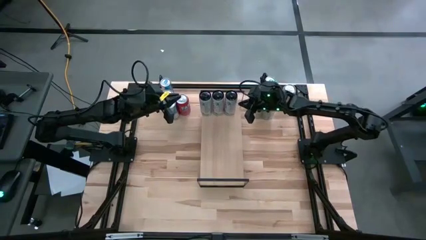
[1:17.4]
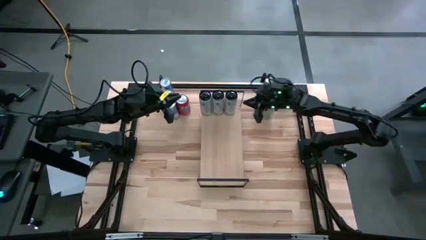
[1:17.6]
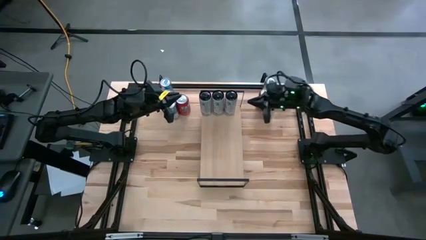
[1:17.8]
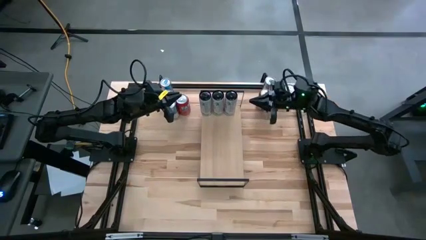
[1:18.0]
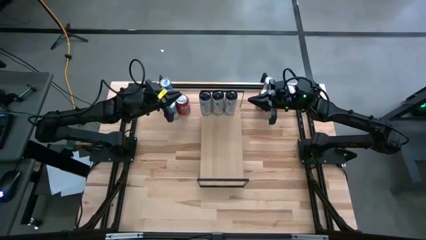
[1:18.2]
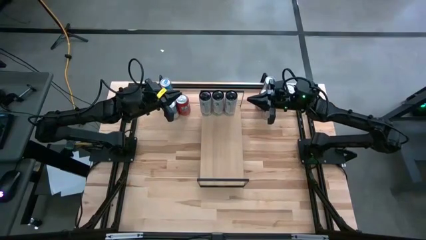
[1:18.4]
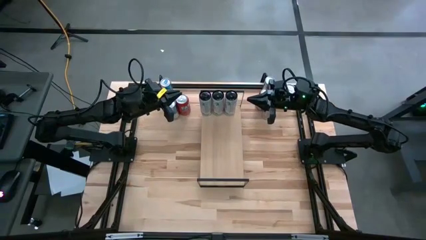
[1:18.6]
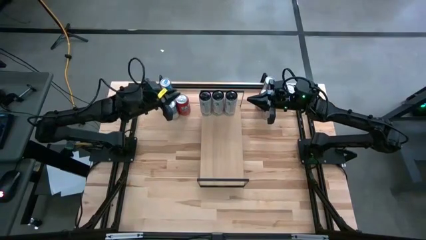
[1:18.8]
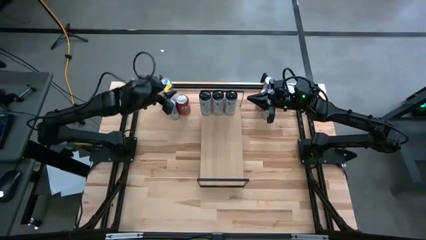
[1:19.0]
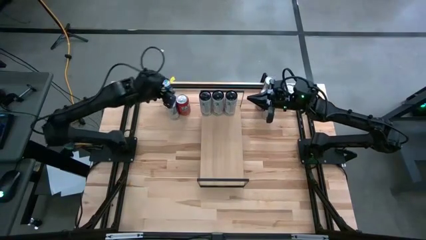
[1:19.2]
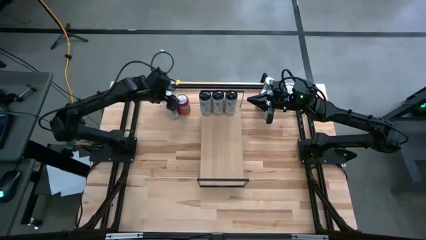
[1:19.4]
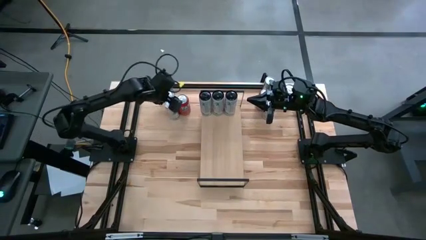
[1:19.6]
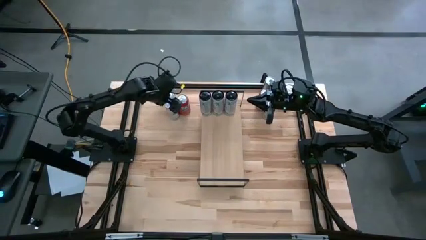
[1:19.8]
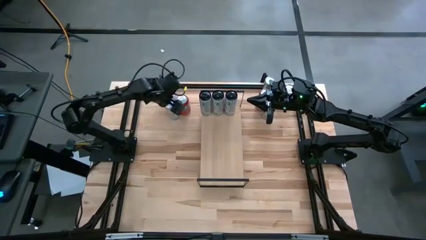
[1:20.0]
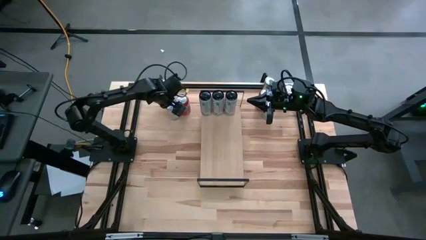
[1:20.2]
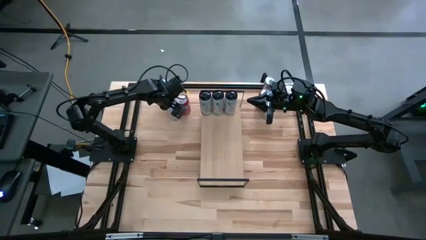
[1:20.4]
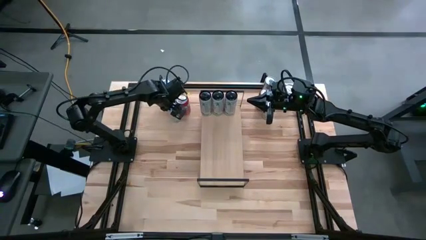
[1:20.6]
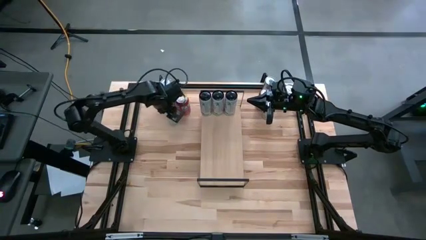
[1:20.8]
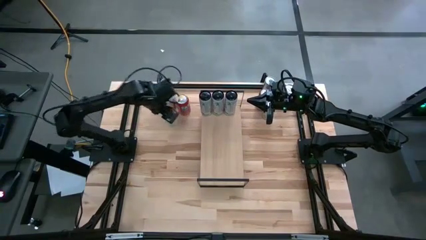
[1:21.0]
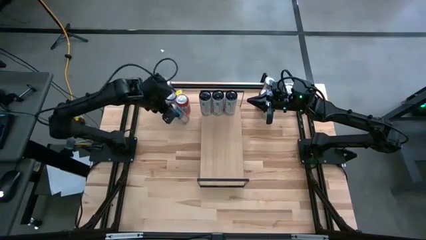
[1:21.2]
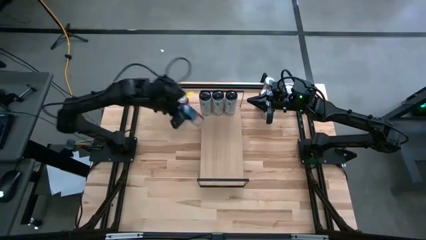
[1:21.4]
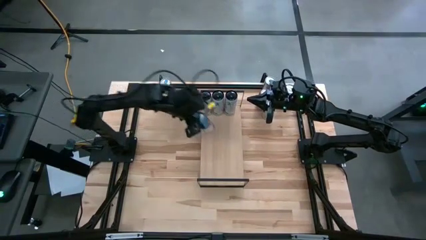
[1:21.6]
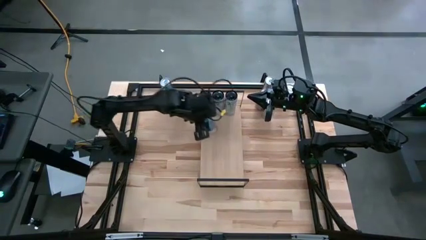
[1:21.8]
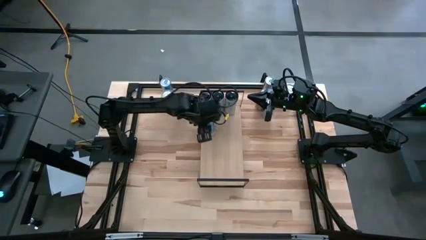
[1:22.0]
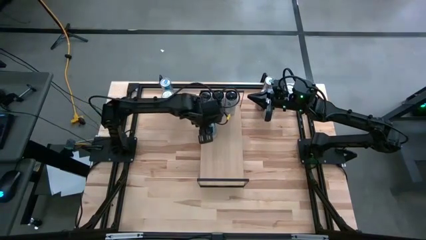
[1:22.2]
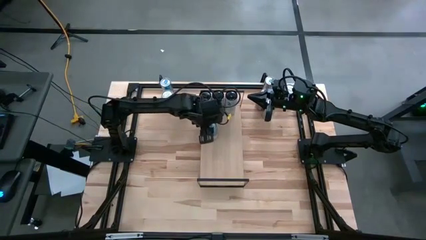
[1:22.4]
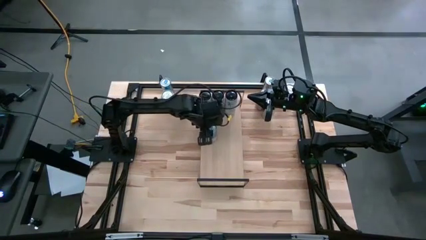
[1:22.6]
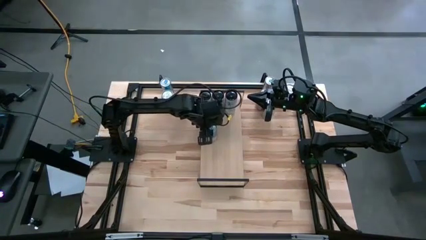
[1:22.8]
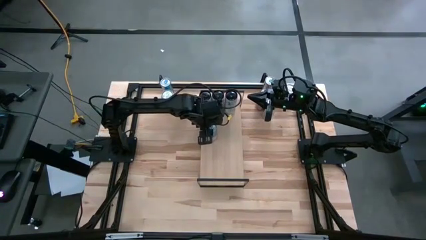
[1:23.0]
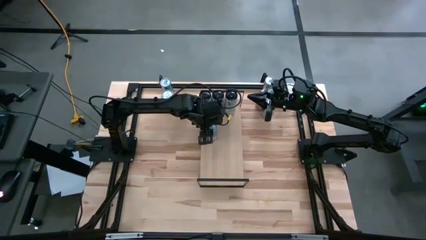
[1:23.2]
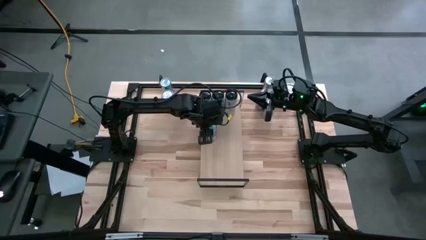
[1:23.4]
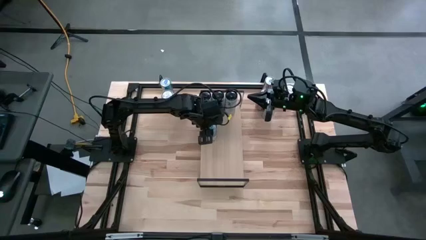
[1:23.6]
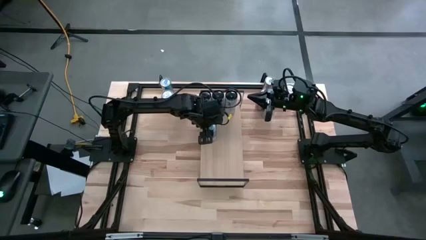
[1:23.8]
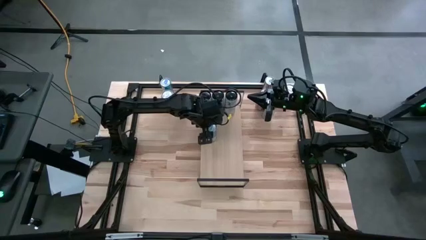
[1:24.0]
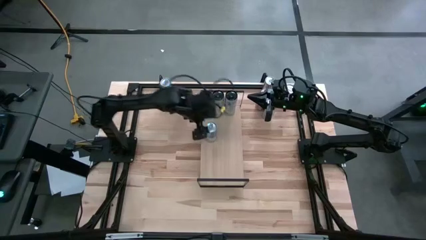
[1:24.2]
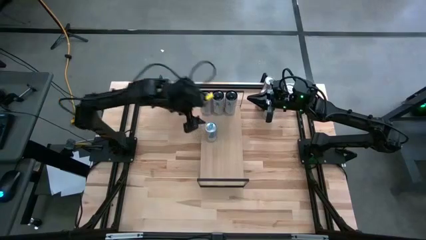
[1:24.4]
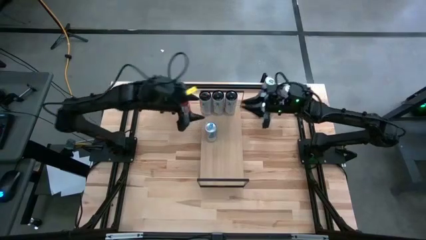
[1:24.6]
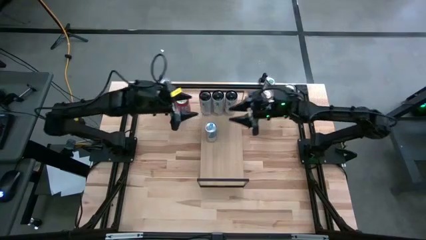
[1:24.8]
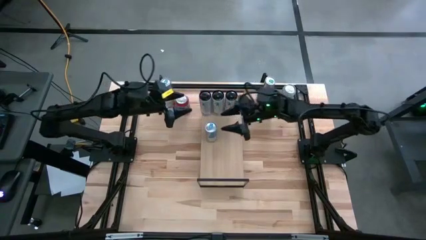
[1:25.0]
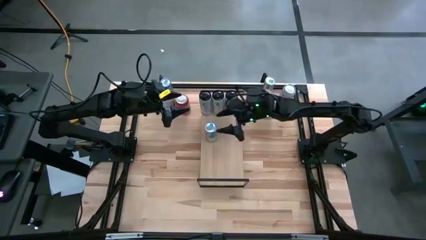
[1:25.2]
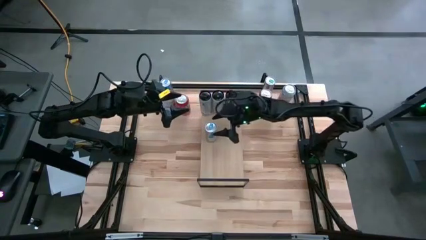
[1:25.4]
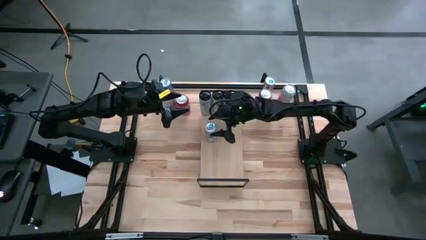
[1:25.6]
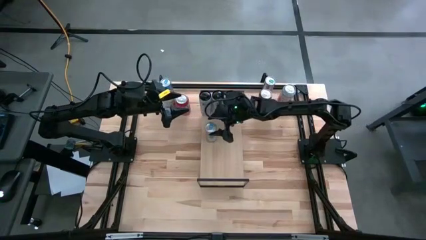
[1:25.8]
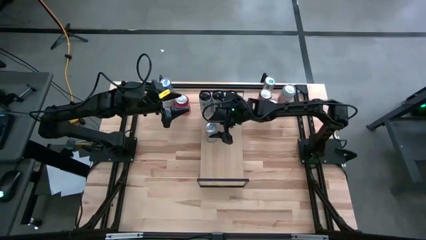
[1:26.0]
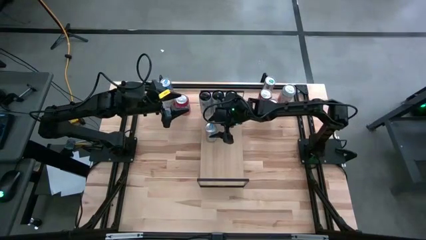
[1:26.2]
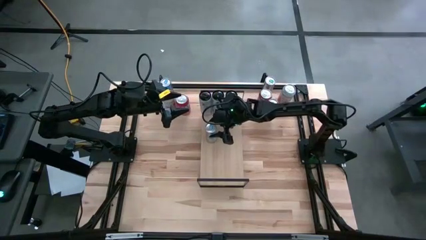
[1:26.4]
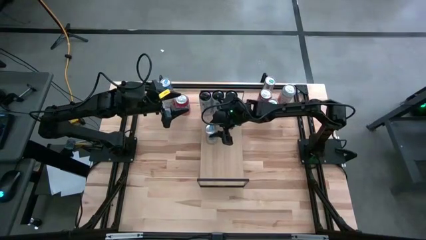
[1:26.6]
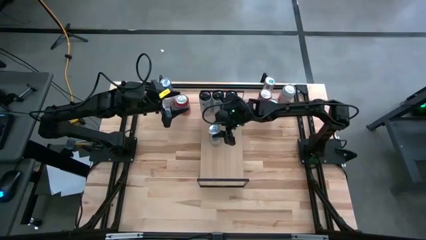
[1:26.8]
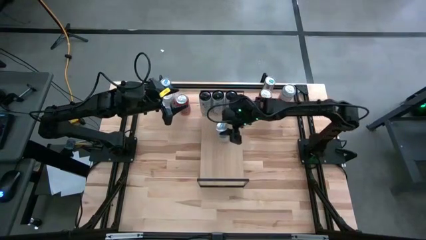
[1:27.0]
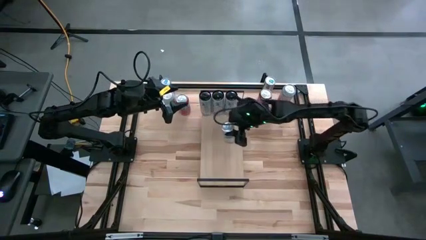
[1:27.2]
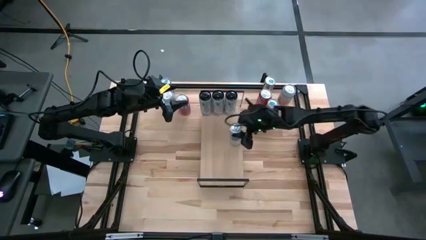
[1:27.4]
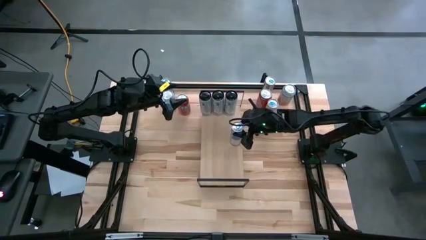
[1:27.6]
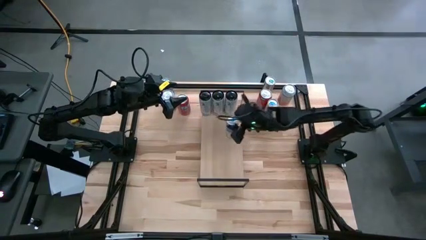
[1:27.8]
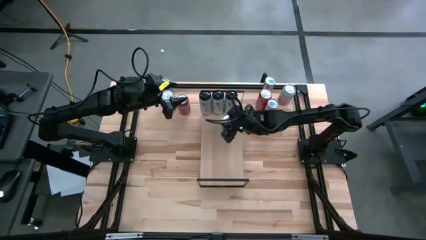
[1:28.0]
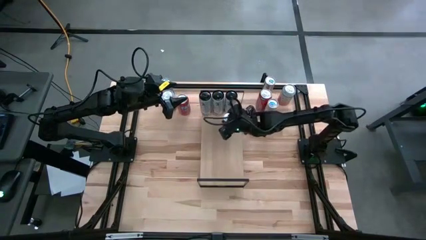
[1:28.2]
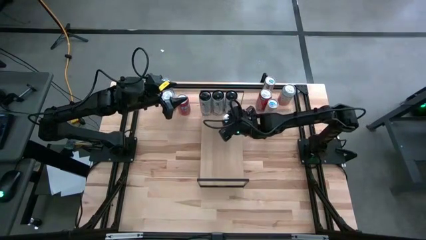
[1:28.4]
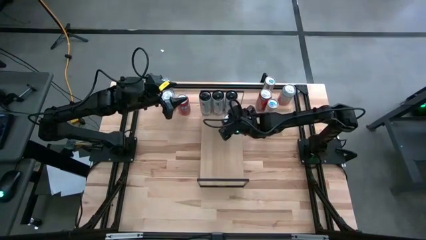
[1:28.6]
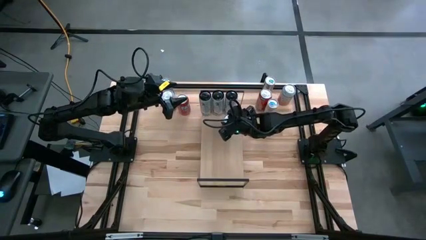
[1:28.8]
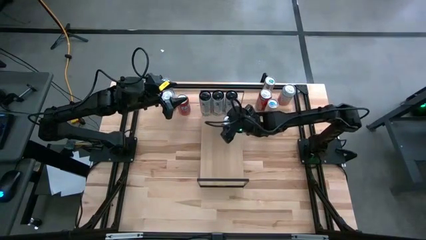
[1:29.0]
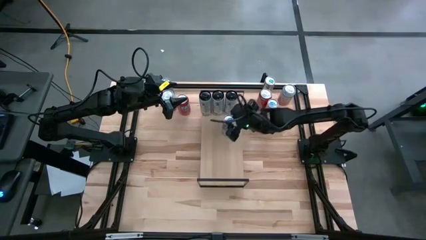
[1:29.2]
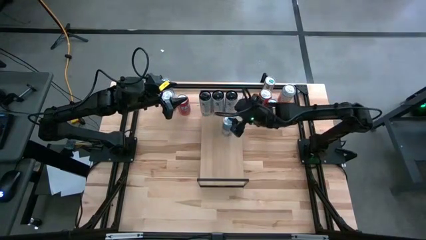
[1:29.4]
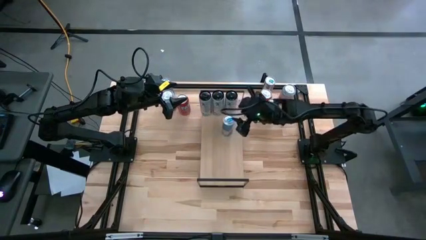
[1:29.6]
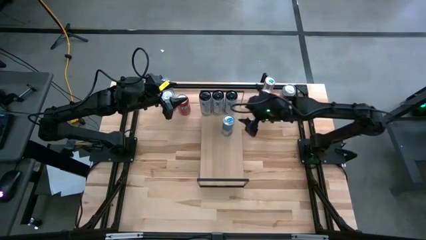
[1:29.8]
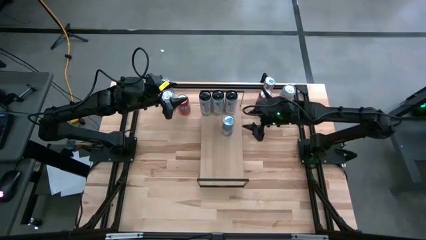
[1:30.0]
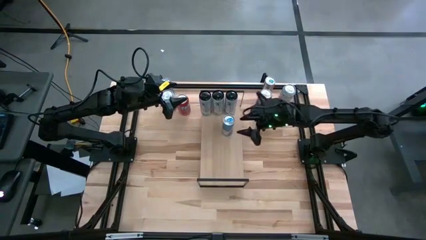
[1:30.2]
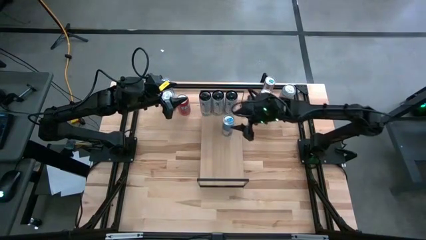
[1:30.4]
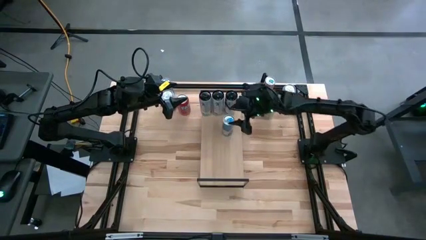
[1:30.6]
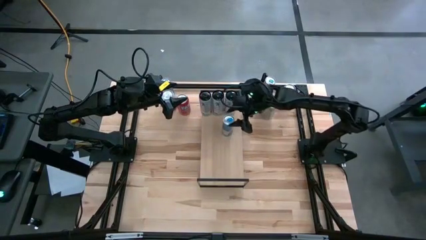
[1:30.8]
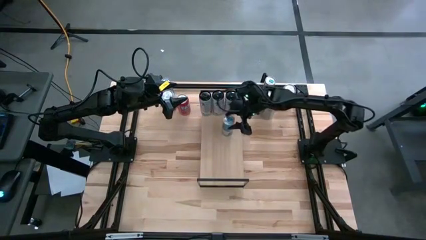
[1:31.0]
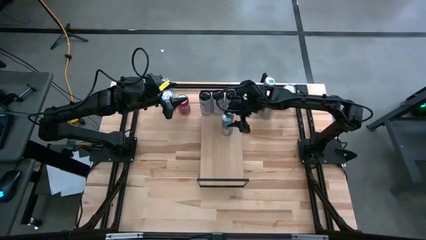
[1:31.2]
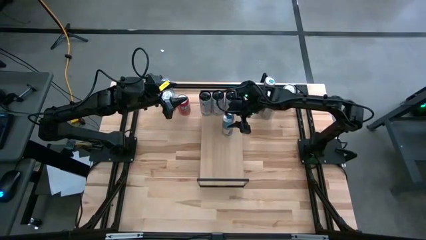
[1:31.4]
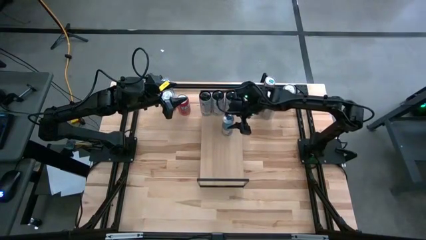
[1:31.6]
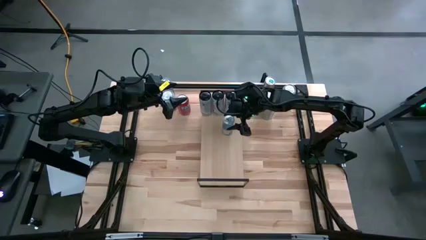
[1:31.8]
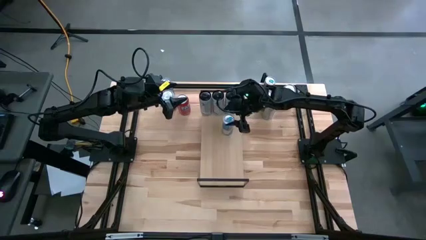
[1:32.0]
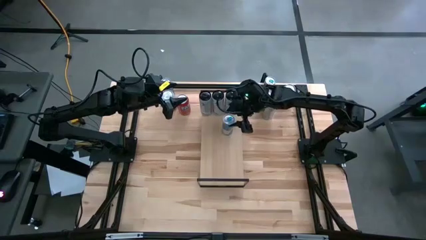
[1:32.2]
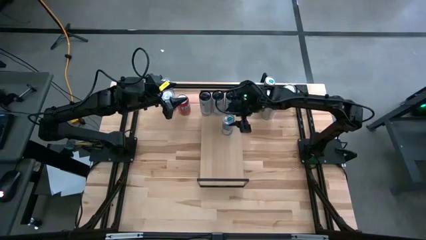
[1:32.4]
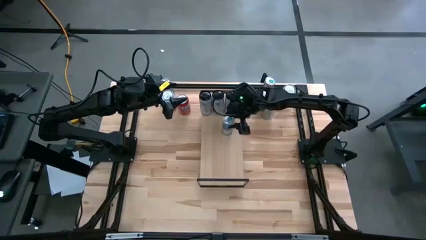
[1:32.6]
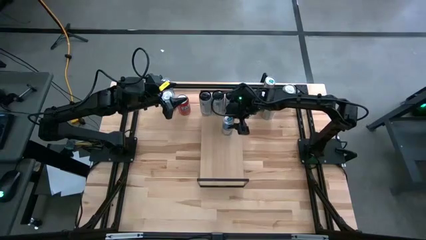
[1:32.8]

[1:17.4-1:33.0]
Task: Place canned beverage on shelf
Put the bottom left blue soda can on the shelf

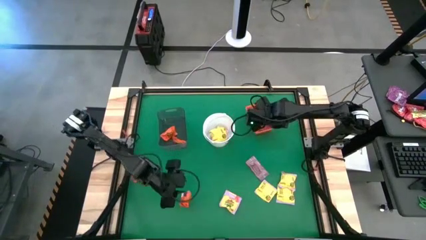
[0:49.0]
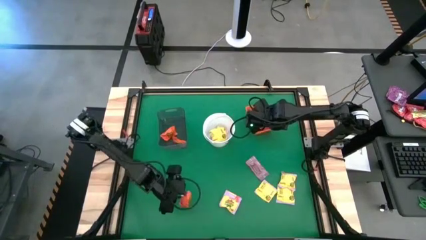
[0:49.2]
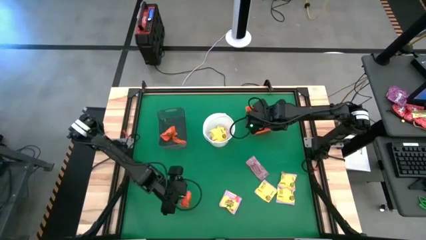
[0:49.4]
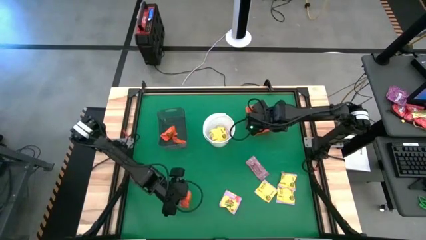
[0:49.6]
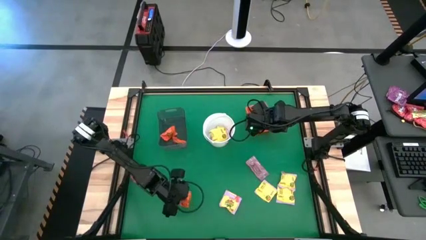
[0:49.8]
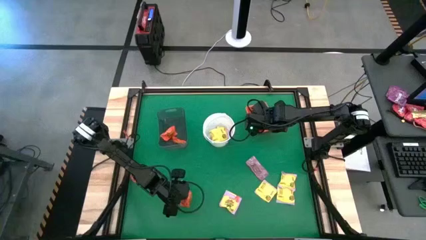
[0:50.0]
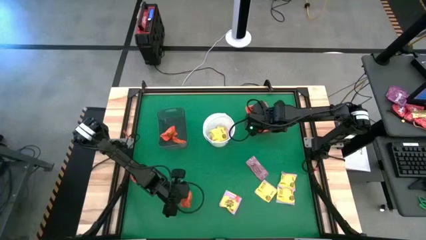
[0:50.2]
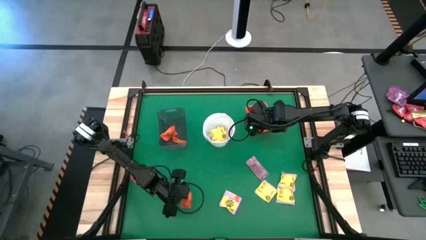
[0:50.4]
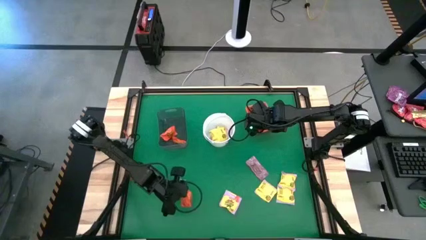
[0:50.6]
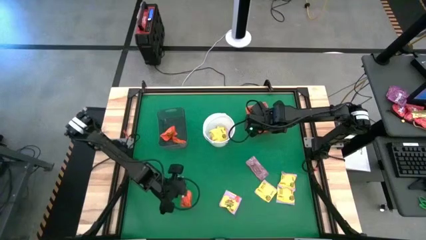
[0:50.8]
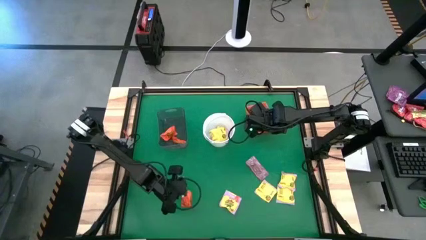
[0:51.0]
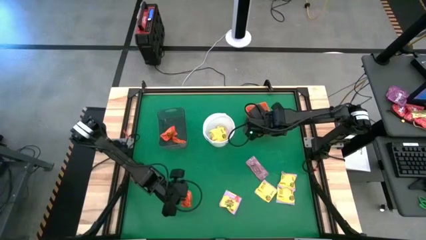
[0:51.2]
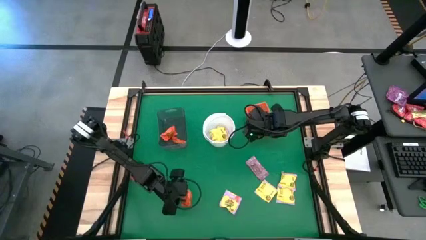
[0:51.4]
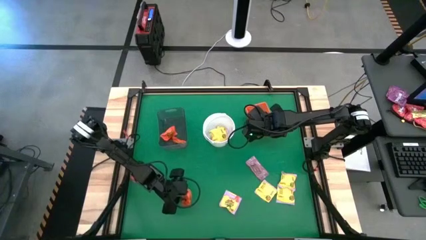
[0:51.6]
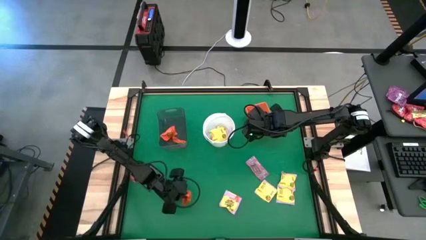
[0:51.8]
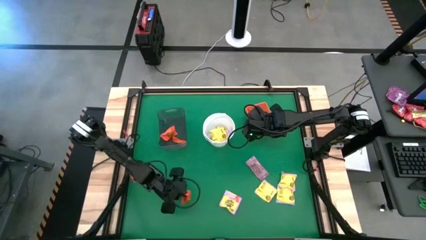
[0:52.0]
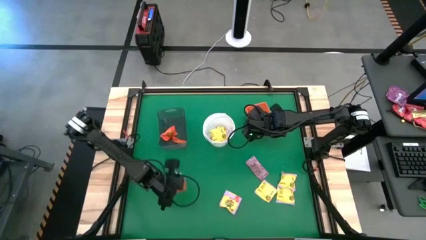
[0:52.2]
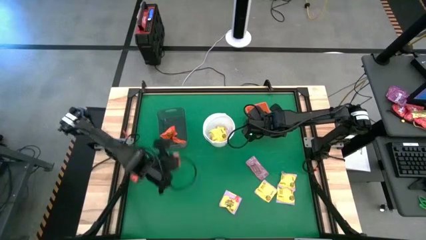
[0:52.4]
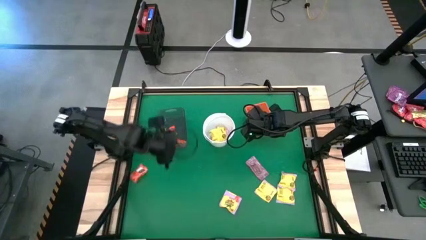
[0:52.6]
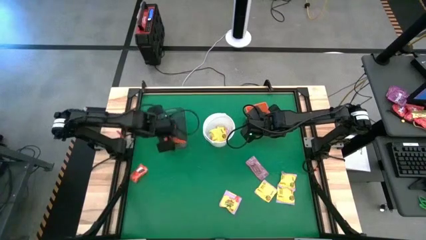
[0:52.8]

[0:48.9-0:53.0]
Task: Sort candy by brand, put in halloween buckets
Put the orange chocolate into the black bin
